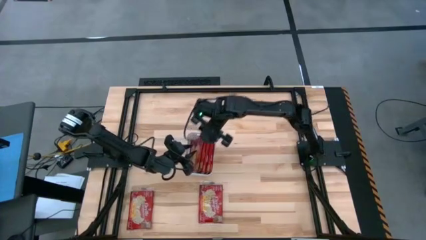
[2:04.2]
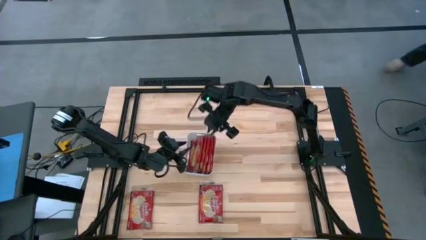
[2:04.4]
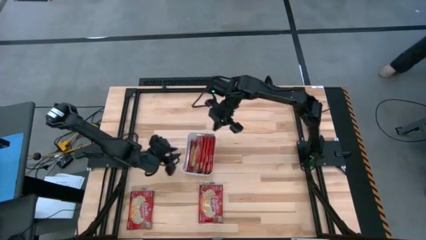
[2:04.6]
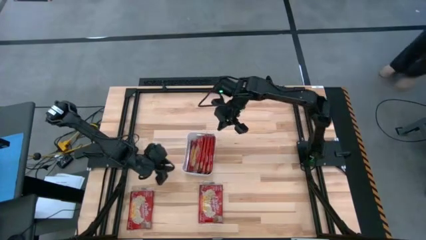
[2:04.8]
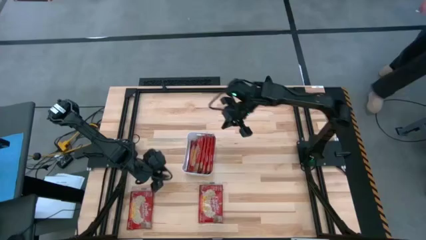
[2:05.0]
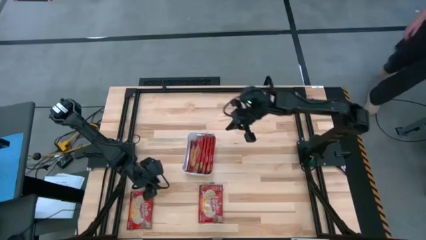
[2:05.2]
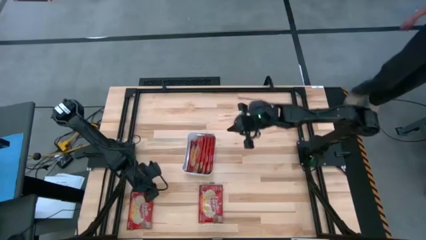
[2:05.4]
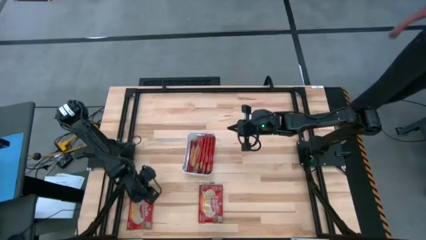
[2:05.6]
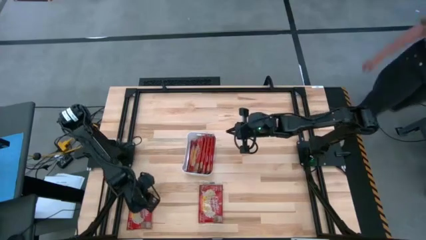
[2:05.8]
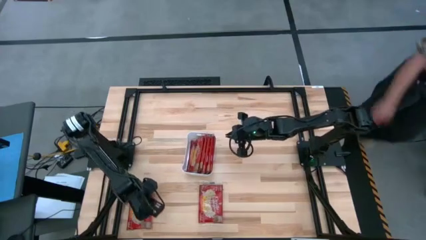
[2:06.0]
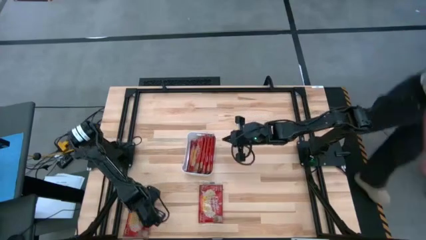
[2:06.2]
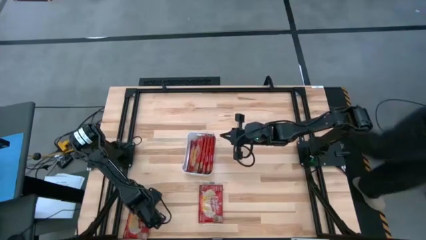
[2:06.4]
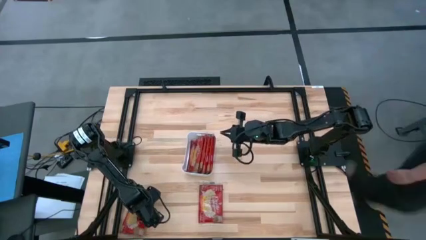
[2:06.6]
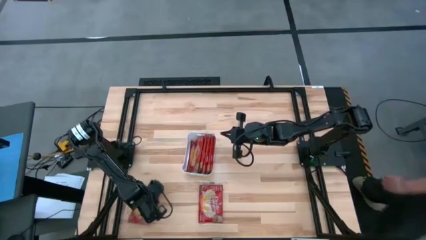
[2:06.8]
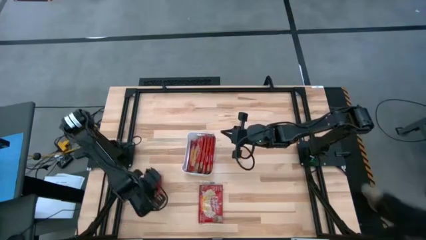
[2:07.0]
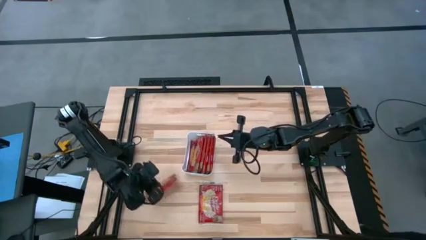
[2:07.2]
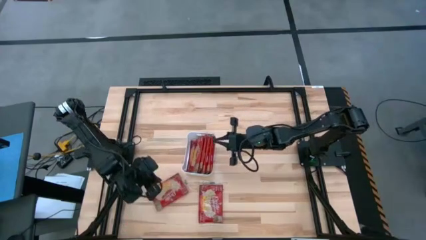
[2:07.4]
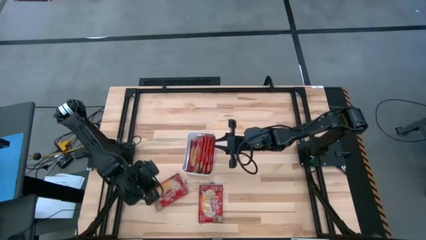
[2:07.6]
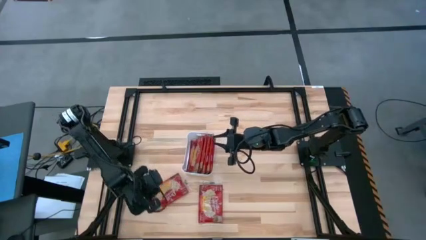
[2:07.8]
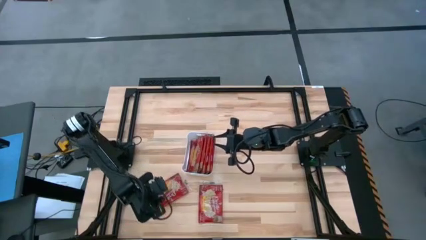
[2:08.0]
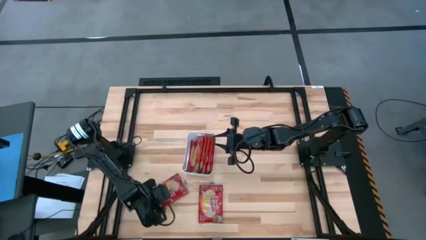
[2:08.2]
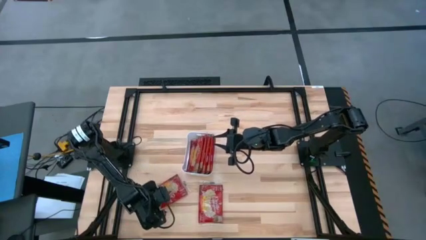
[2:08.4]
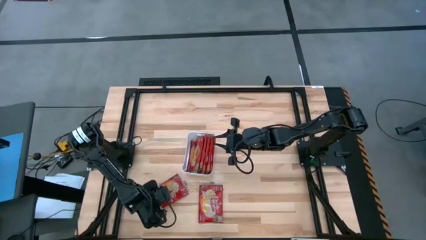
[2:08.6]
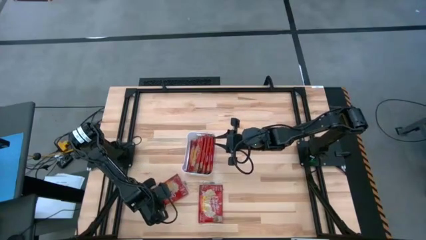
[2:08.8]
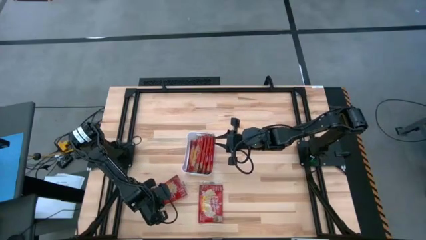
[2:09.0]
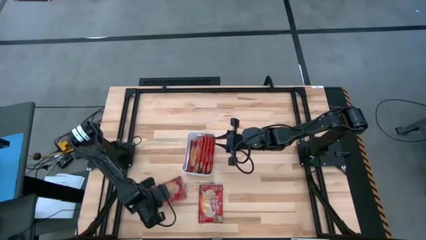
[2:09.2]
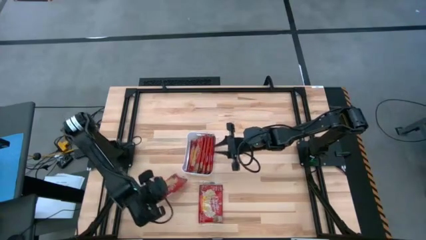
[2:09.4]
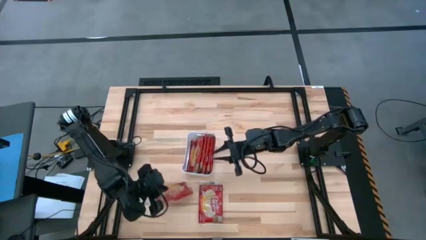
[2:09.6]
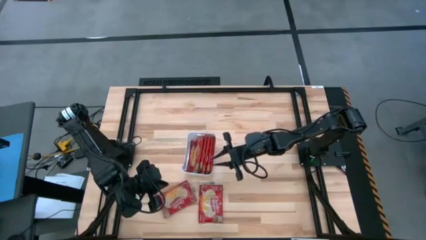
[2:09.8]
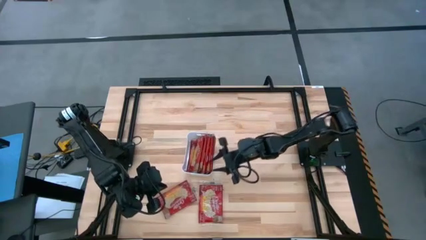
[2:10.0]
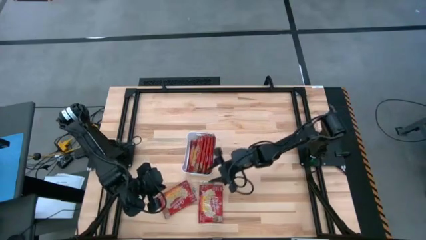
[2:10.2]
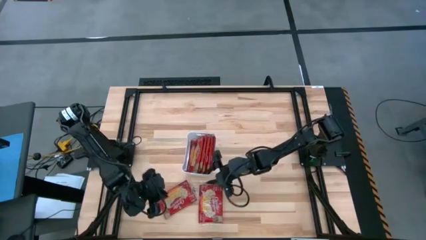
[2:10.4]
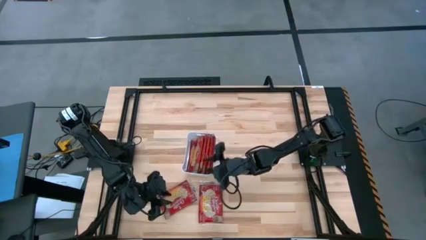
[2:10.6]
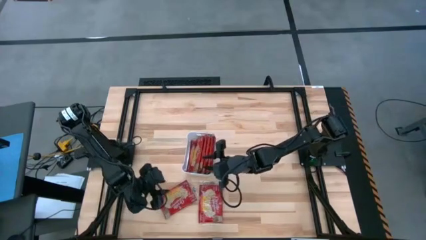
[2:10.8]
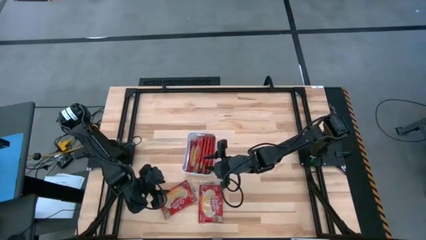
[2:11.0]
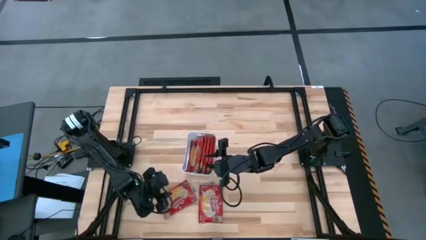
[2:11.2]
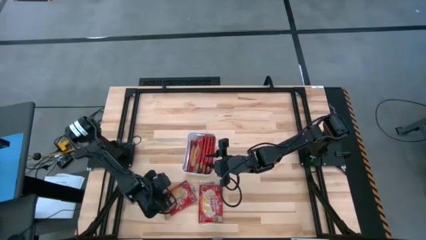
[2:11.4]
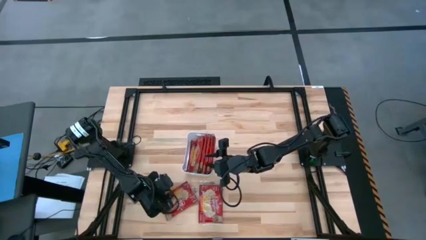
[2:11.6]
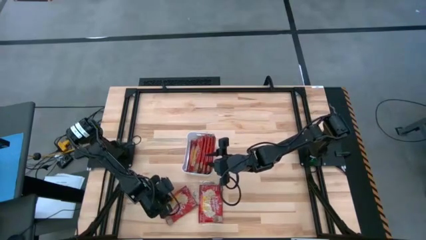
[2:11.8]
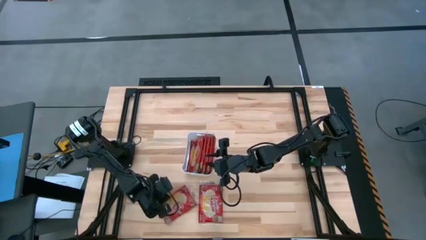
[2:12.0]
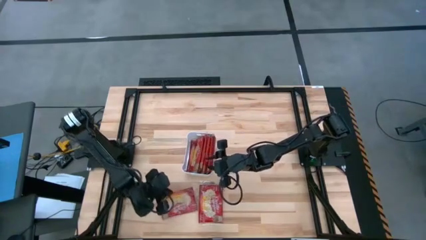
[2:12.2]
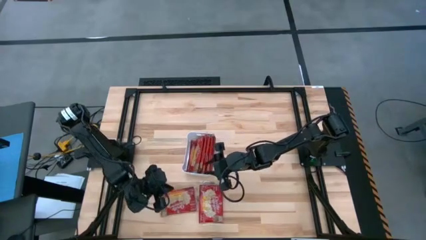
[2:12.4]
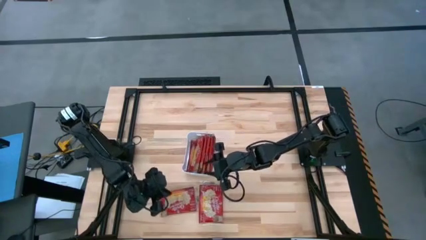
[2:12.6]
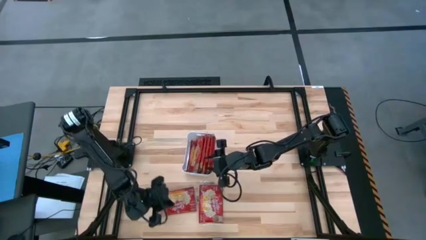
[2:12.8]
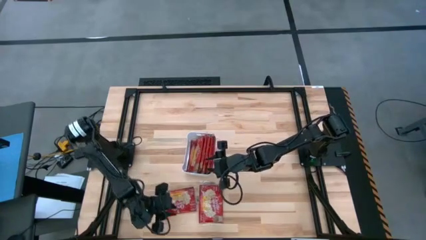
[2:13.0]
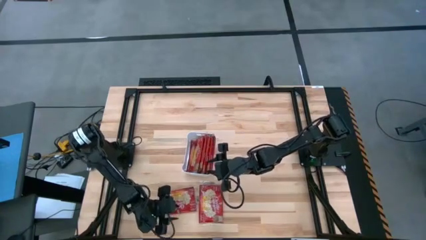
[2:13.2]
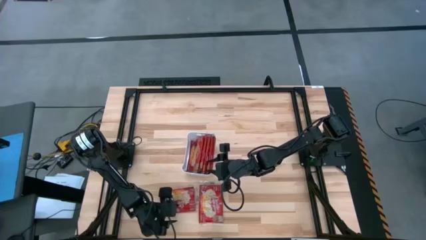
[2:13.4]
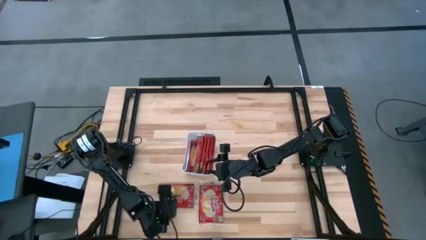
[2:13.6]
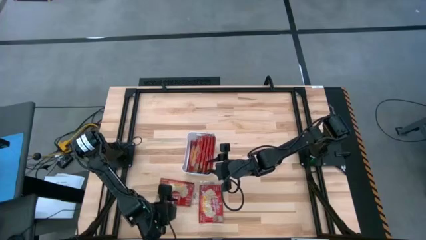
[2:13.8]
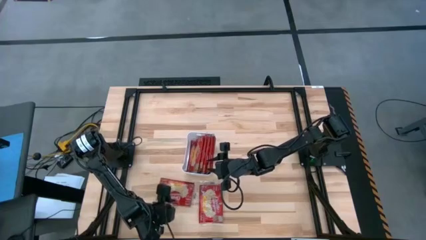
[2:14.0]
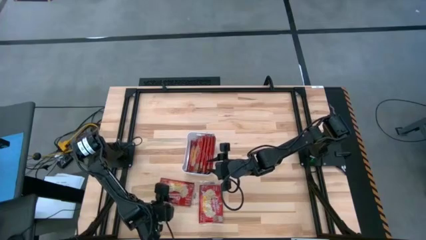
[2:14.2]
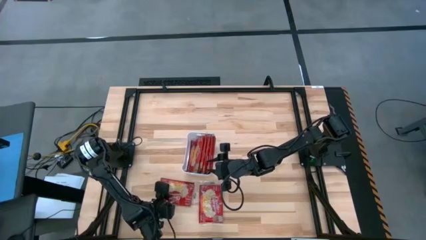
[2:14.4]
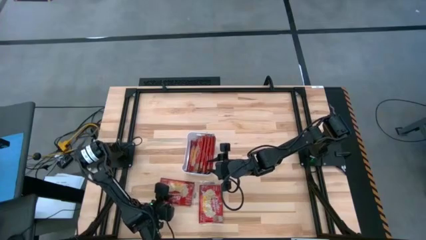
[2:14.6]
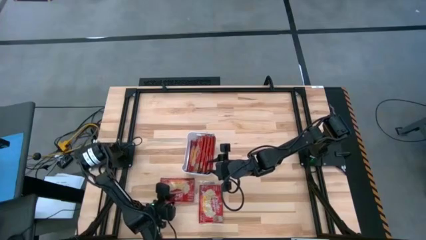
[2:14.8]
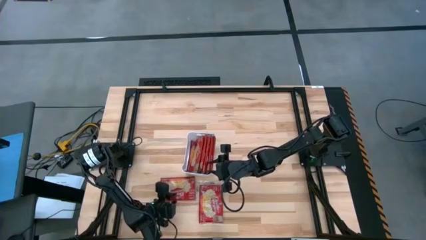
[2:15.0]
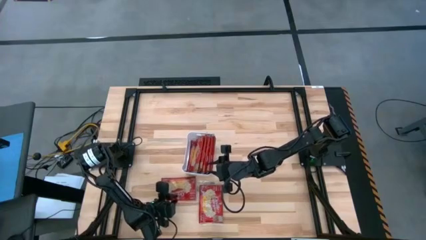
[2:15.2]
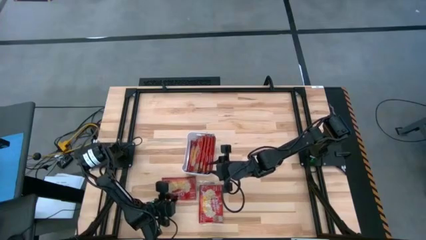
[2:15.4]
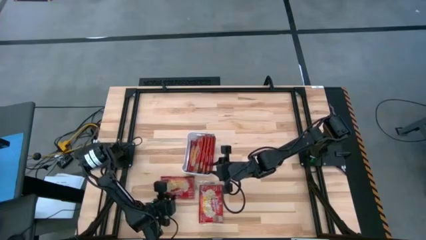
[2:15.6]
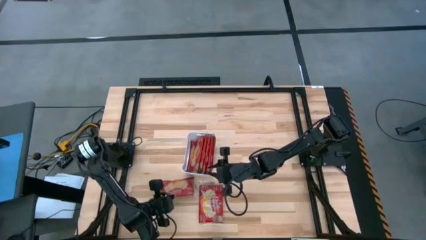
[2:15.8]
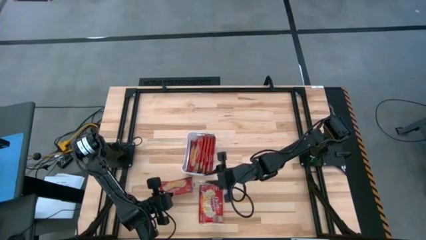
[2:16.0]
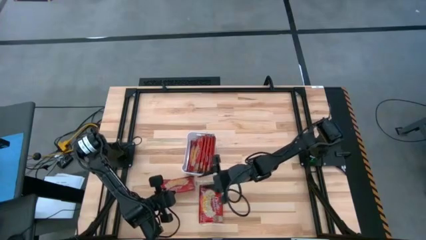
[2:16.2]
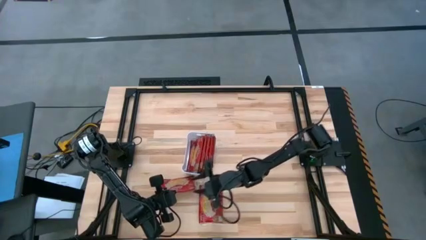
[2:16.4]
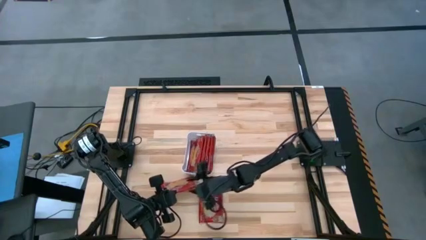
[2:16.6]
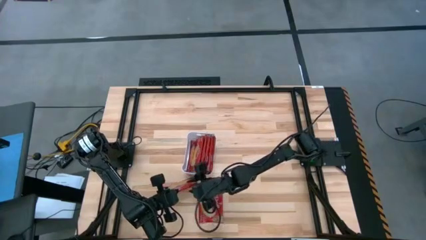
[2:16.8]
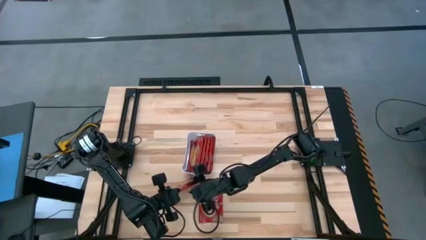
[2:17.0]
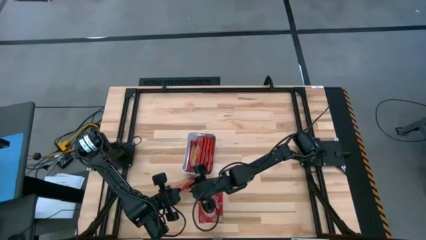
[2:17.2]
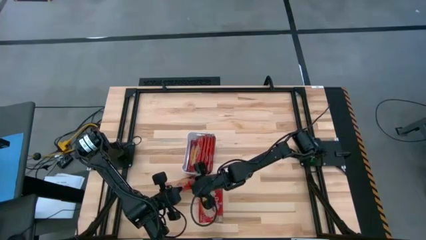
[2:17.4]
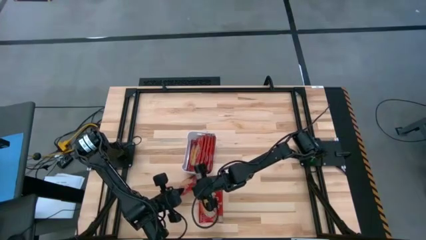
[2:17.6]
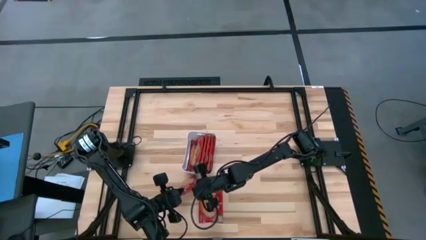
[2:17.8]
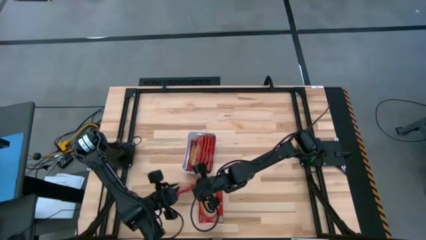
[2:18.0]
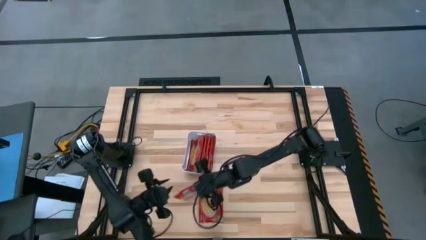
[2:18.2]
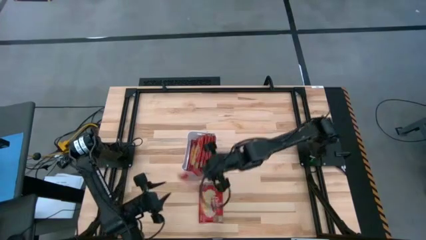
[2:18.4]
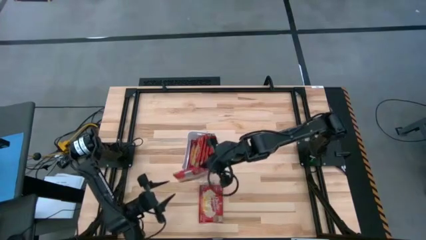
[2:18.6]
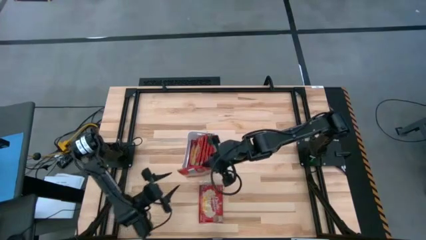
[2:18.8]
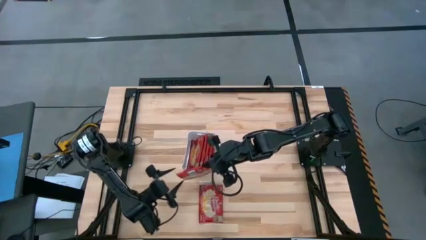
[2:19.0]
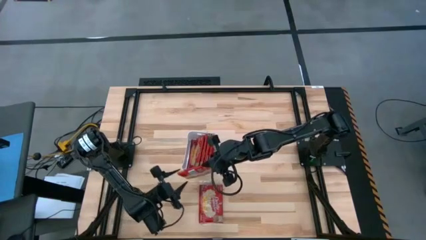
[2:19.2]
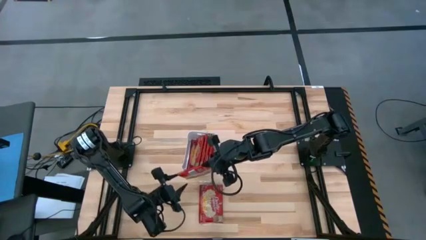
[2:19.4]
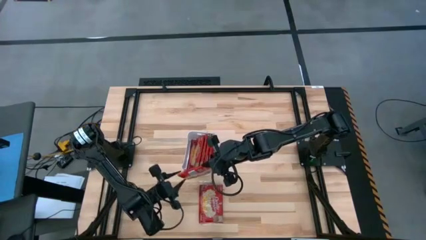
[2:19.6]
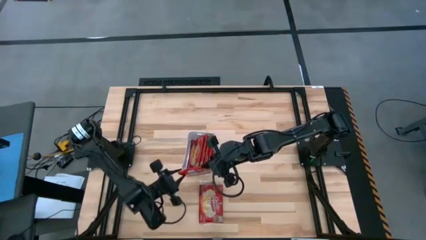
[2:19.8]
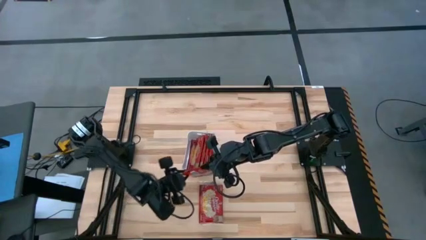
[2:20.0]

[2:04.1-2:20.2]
Task: Sort popcorn bags into baskets
Put the red popcorn bag into the white bin
